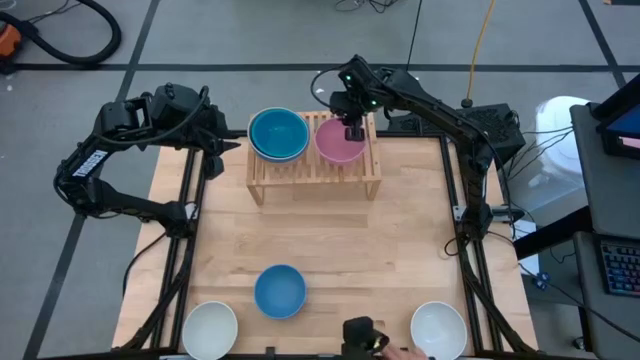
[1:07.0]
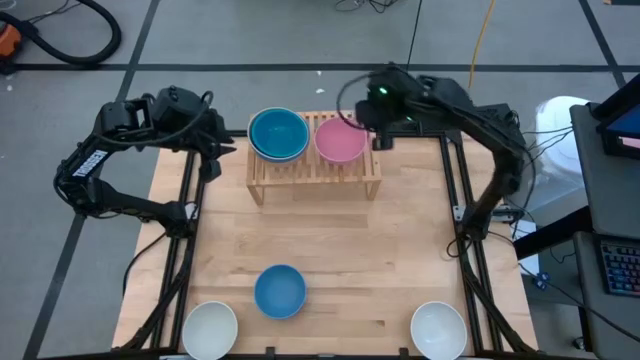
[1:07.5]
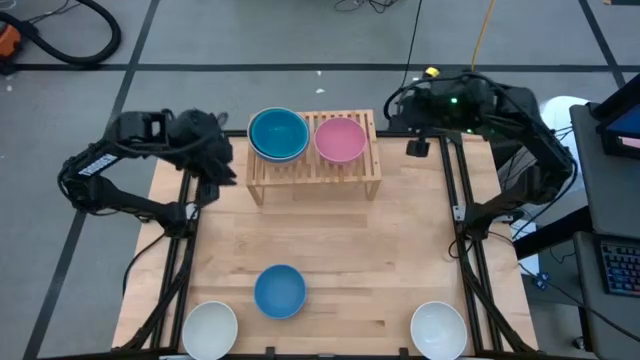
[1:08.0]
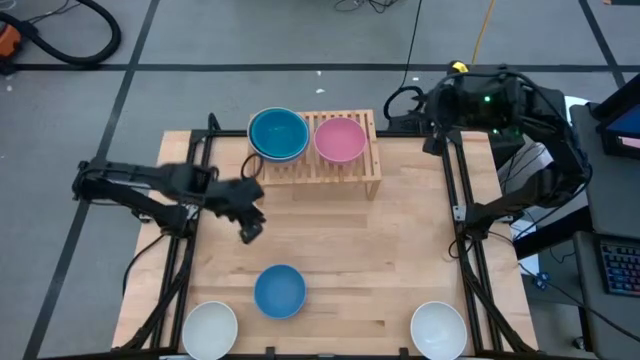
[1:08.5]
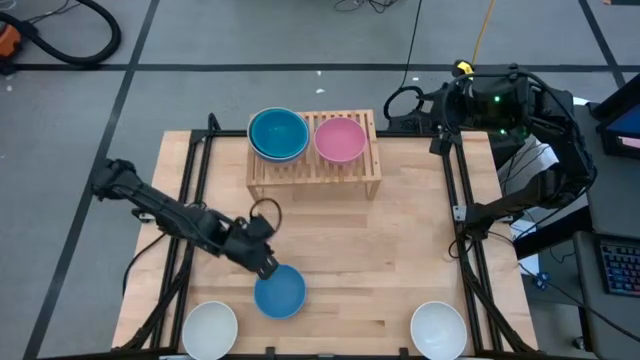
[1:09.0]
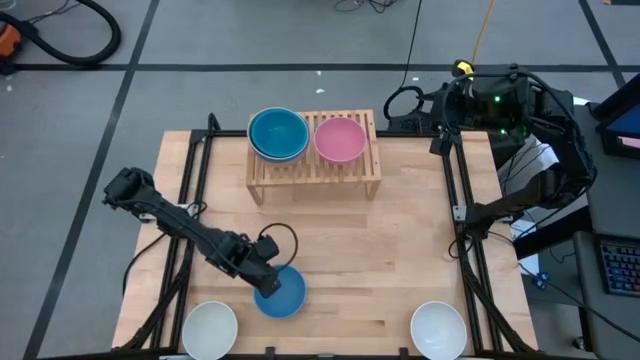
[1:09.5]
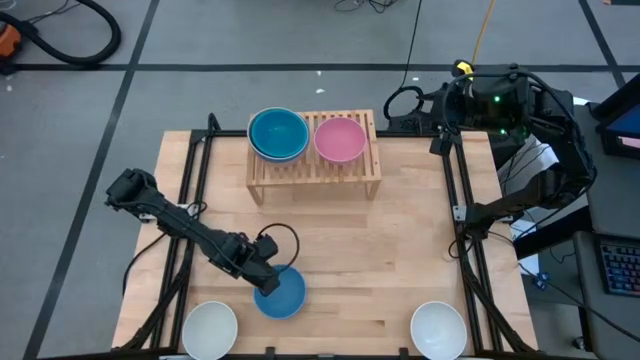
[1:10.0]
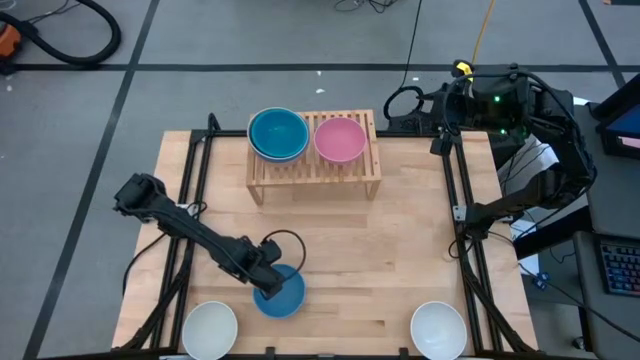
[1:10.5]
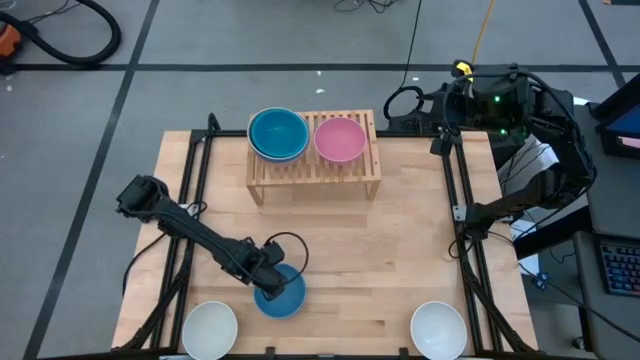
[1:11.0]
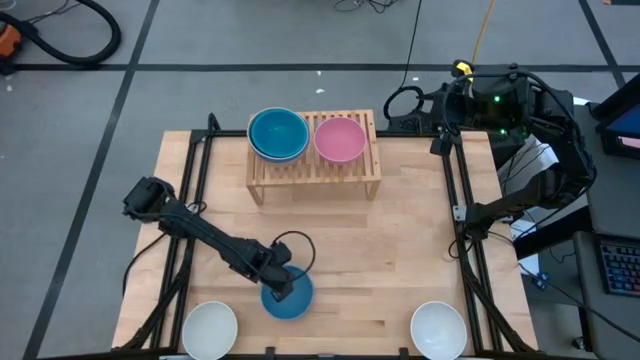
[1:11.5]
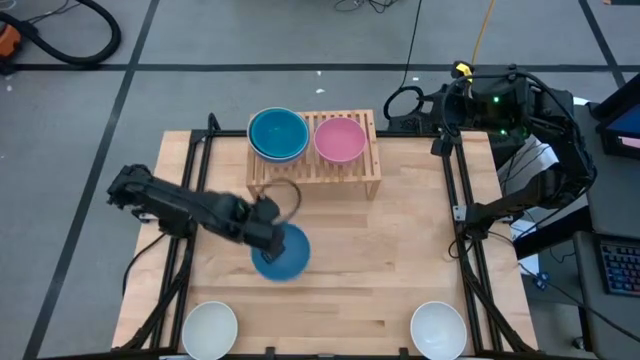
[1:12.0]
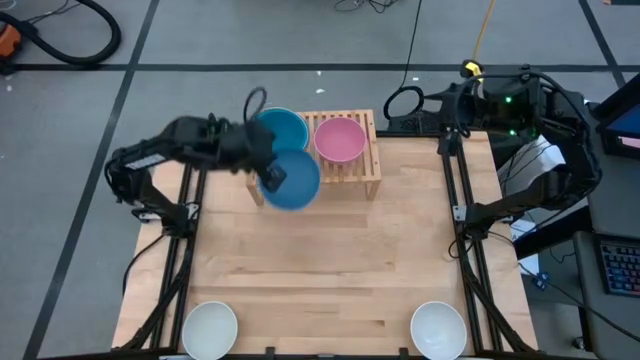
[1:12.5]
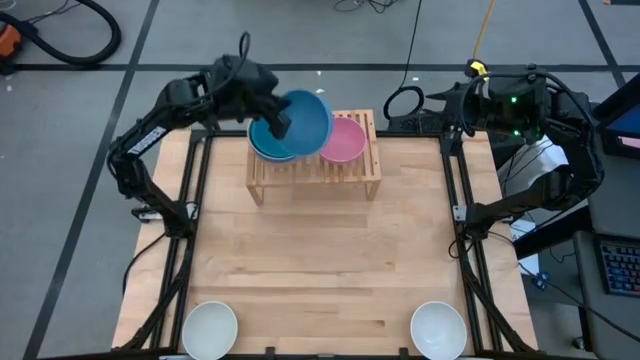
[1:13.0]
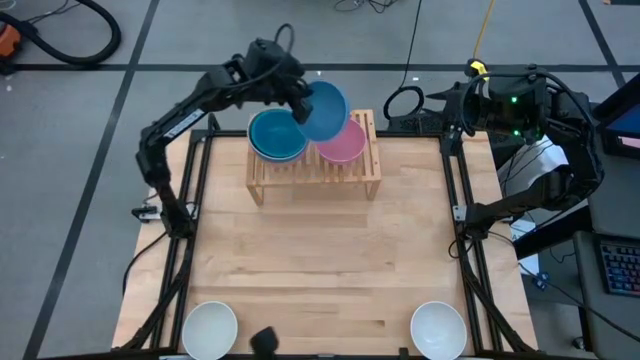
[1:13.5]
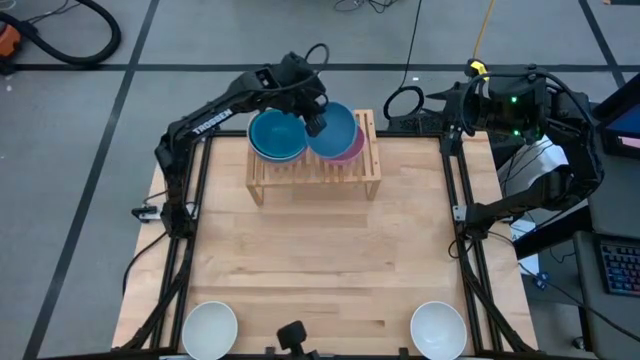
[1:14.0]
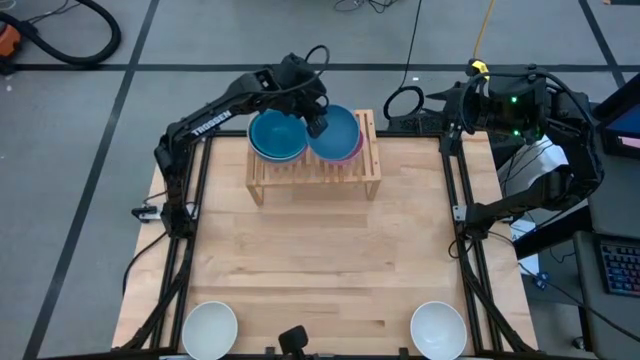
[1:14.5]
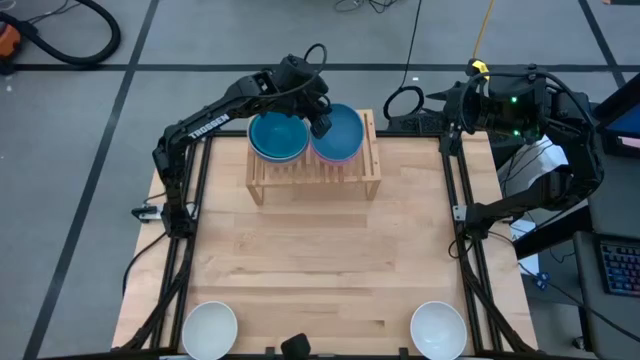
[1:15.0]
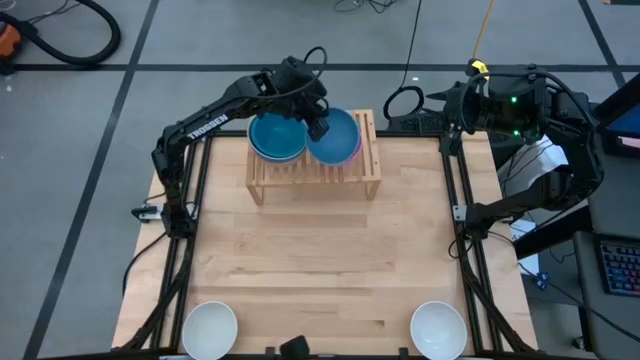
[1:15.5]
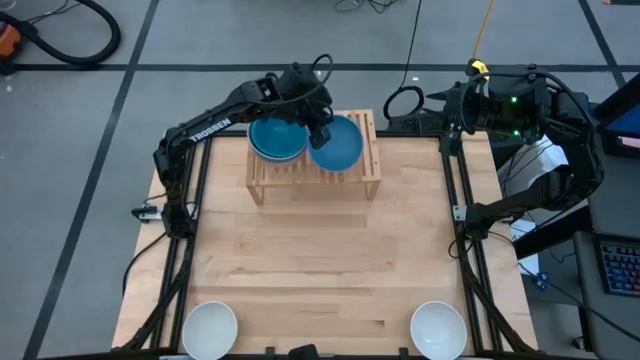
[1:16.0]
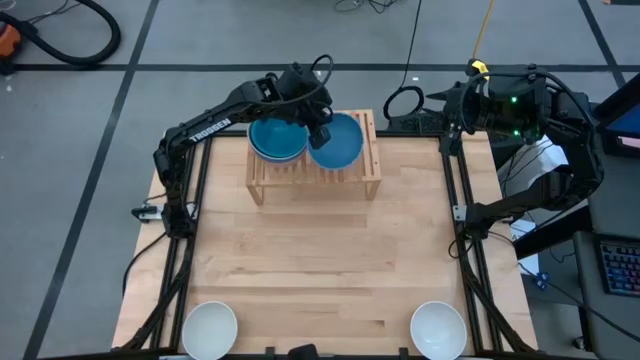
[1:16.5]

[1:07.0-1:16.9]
Task: Place and stack bowls onto a shelf
Stack the blue bowl on top of the pink bowl on the shelf

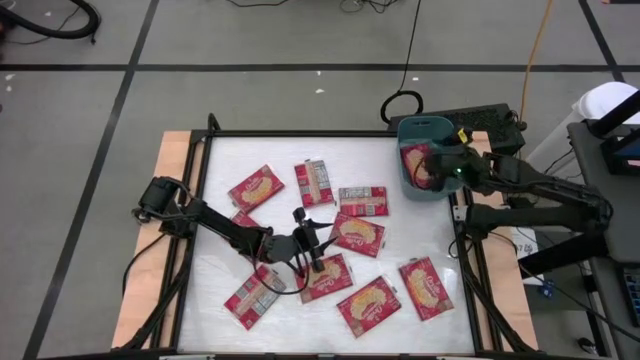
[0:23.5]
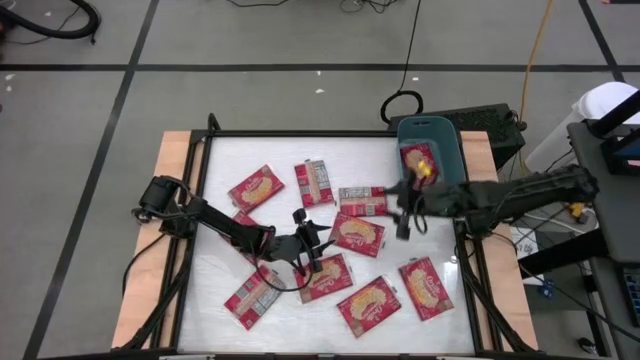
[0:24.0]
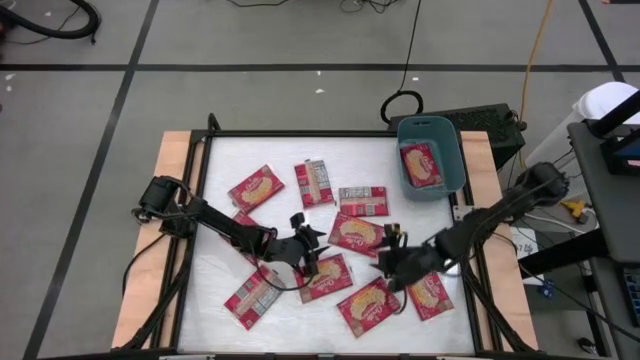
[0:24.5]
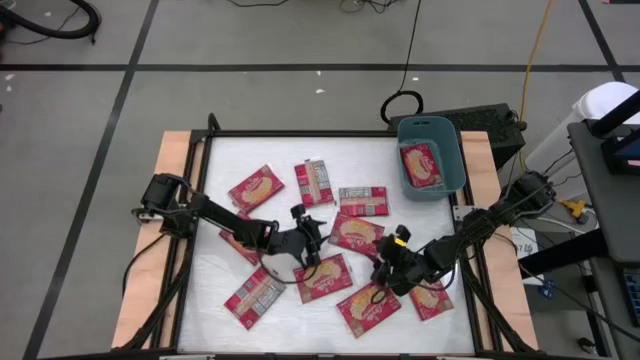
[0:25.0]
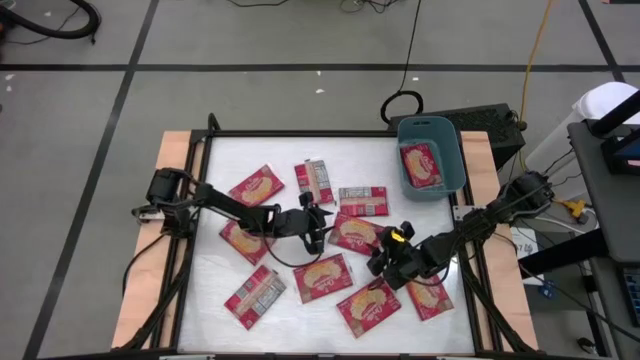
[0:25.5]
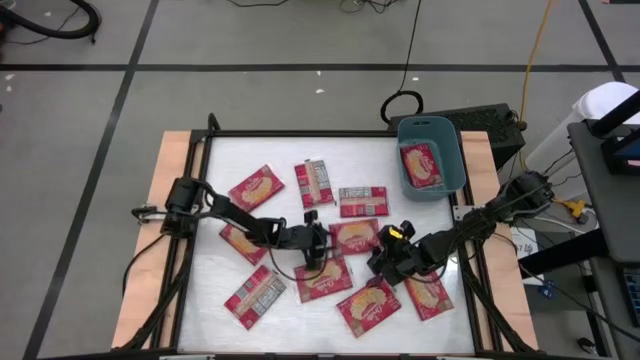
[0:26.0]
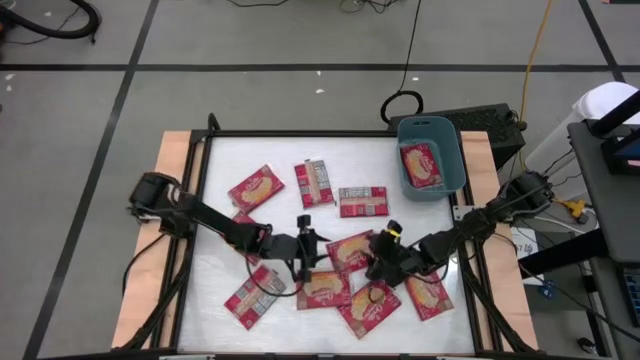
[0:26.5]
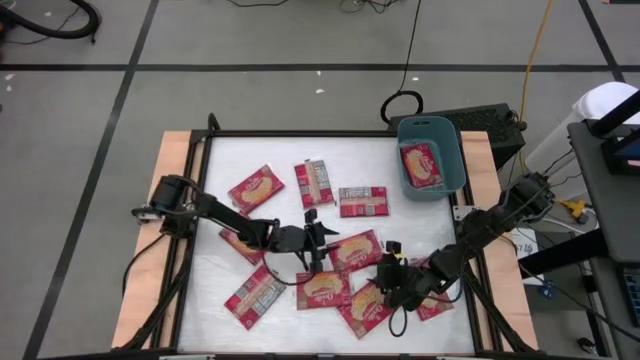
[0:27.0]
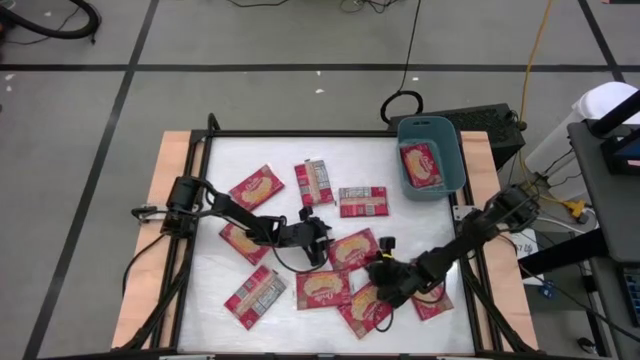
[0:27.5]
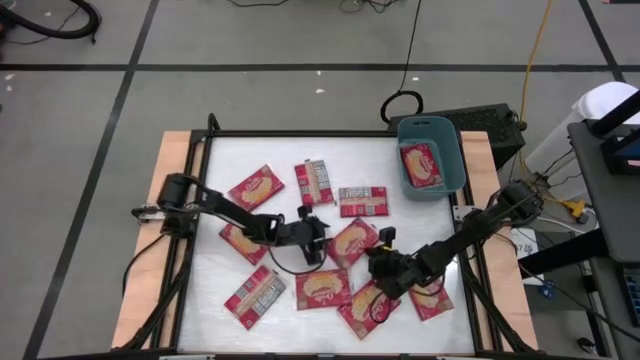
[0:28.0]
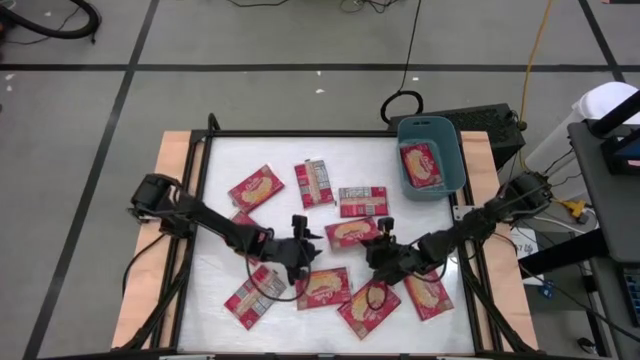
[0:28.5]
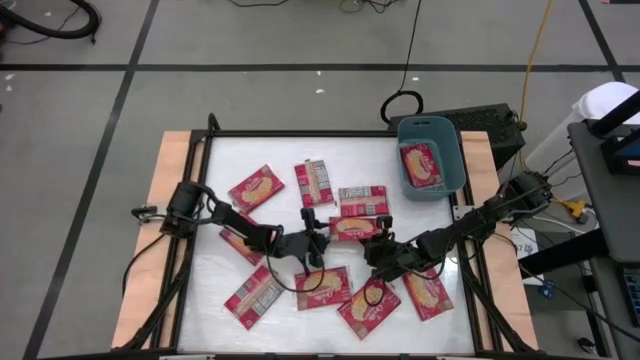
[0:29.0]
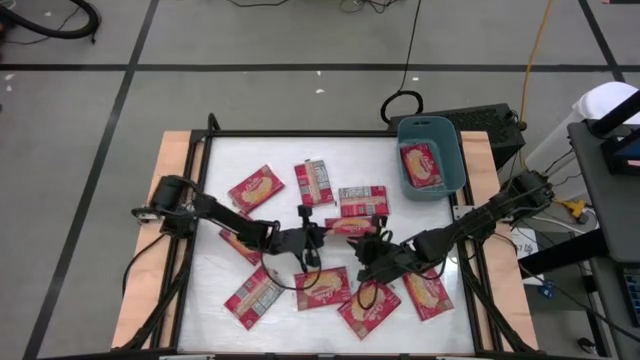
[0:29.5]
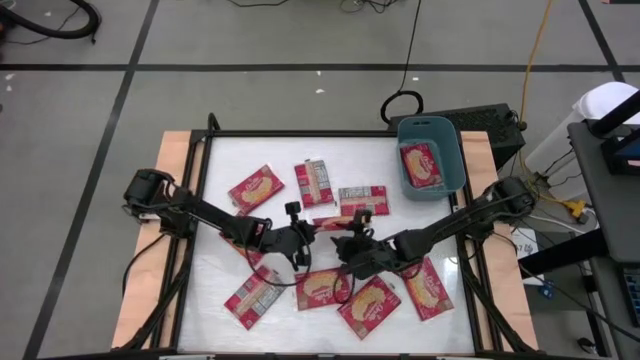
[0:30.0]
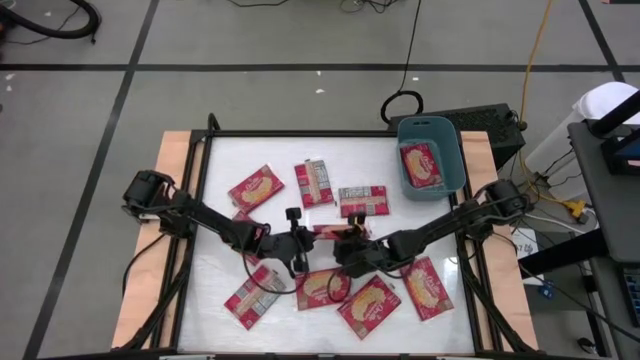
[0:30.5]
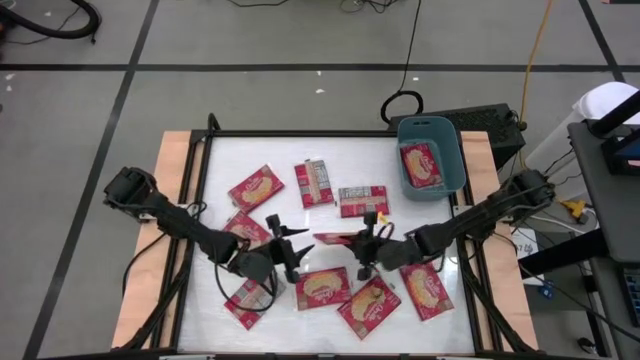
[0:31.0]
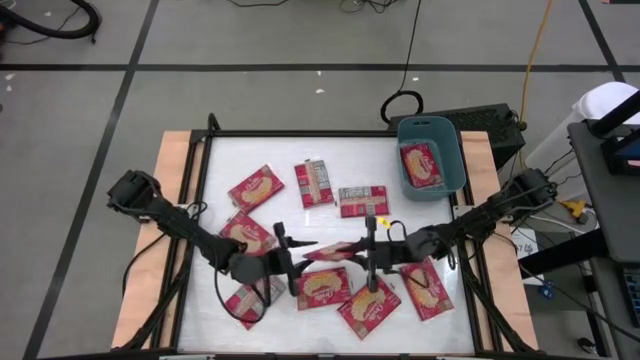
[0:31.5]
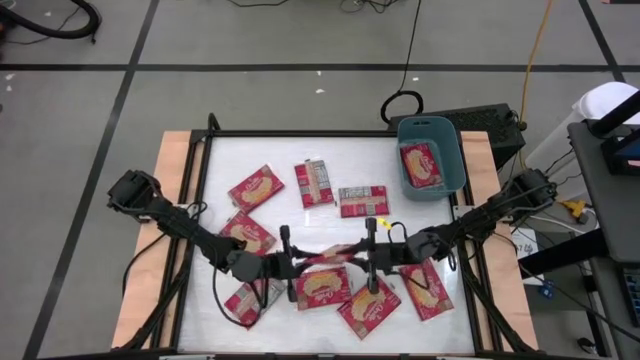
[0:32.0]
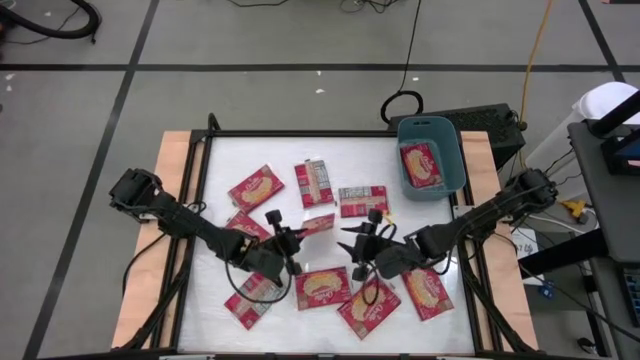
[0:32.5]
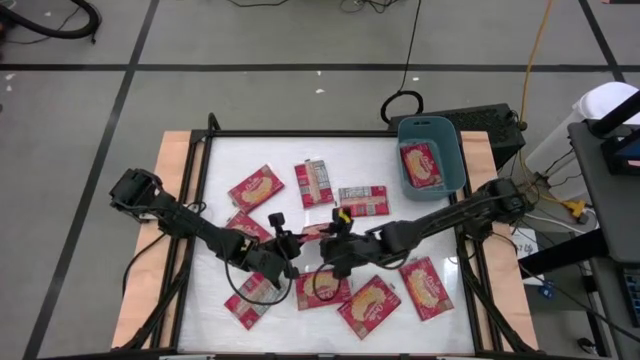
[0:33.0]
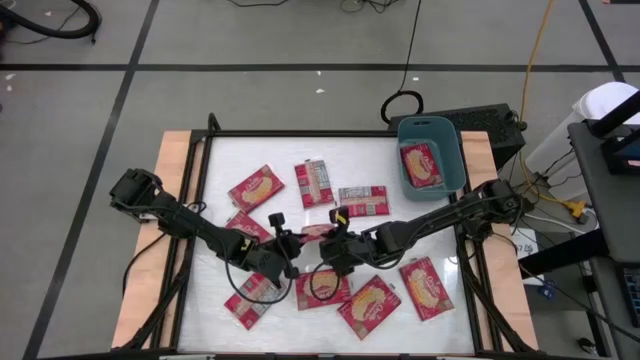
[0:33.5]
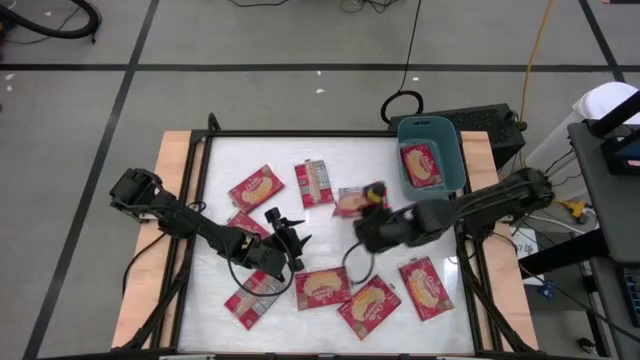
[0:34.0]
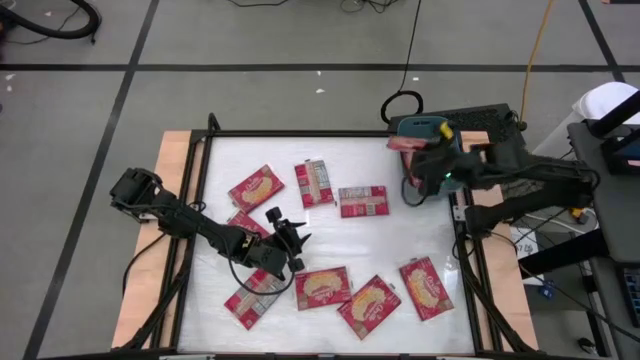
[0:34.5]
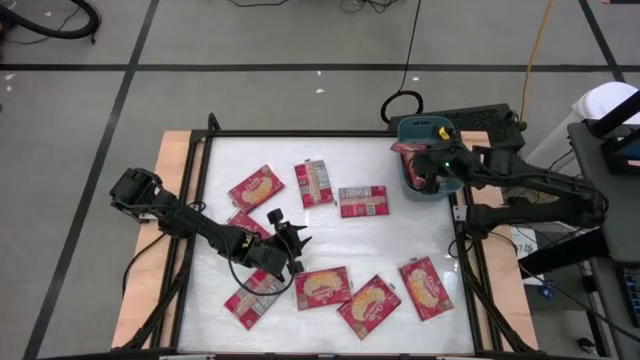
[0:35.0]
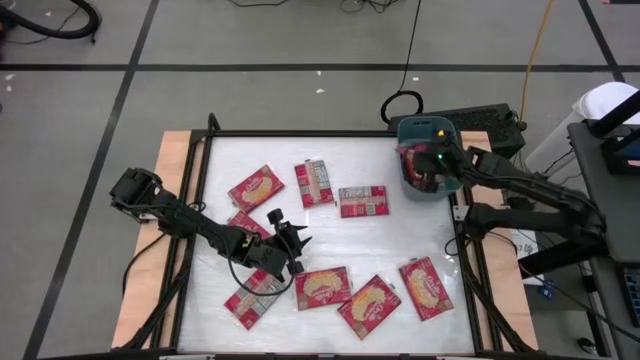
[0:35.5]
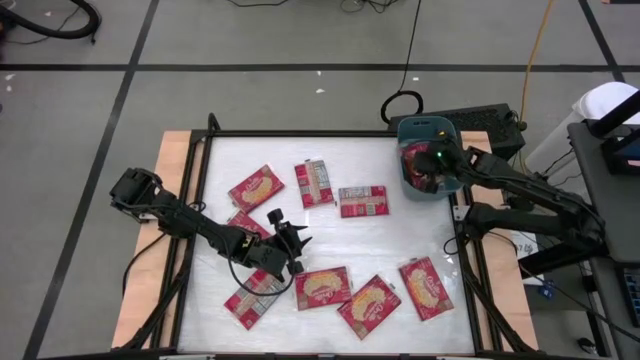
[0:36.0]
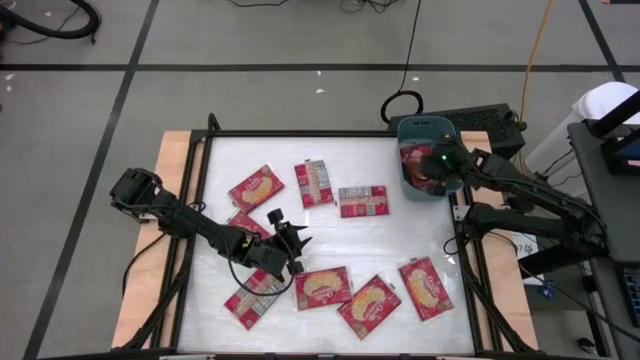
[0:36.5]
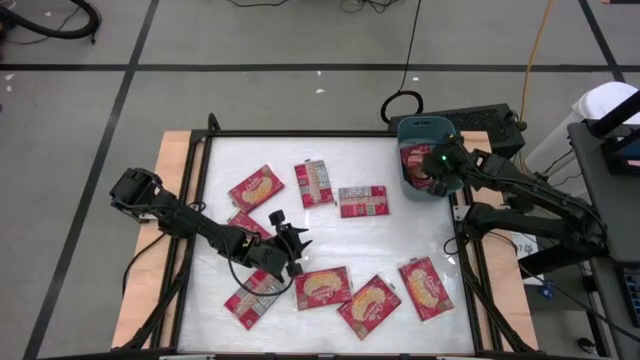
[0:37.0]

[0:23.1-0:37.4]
Task: Sort popcorn bags into baskets
Put the red popcorn bag into the blue bin
